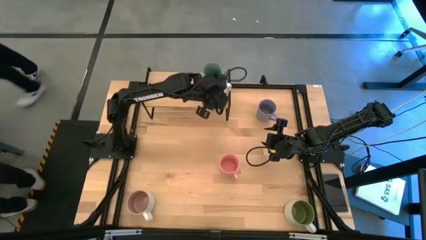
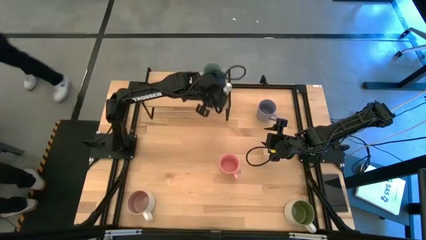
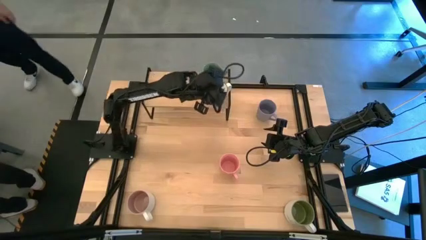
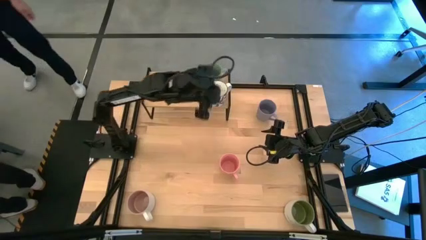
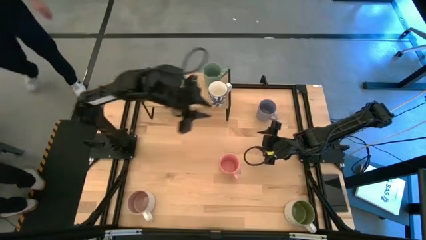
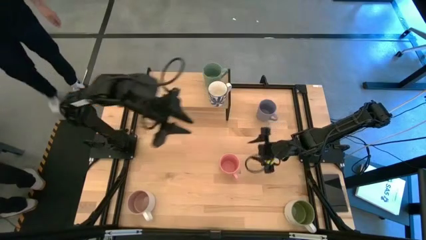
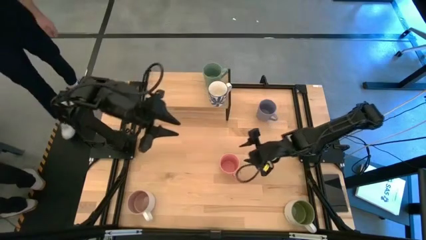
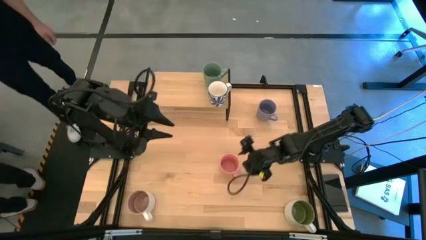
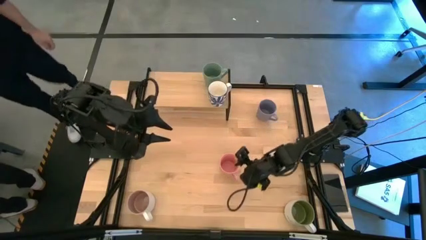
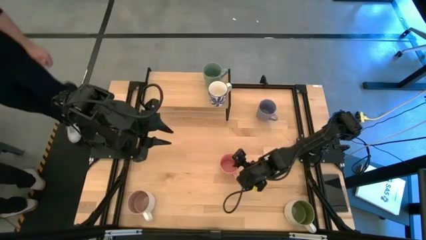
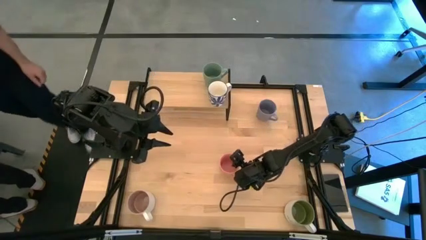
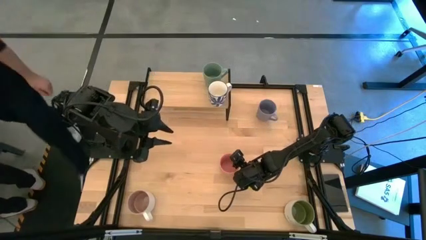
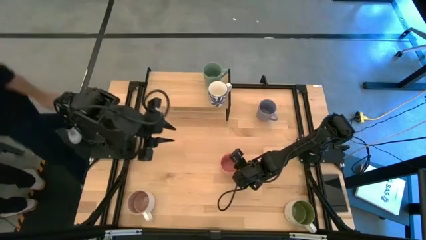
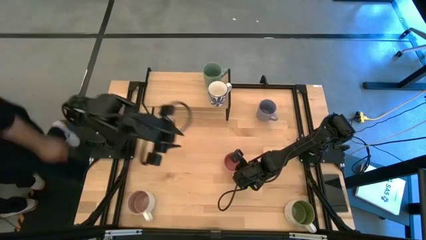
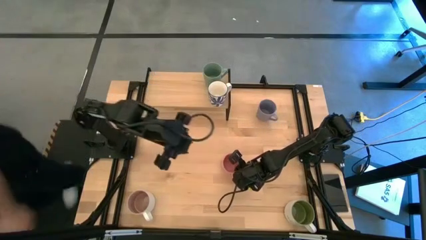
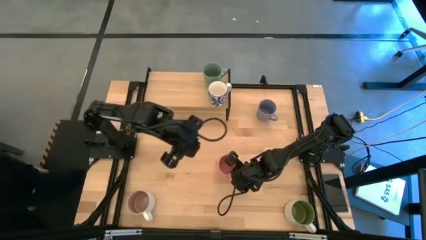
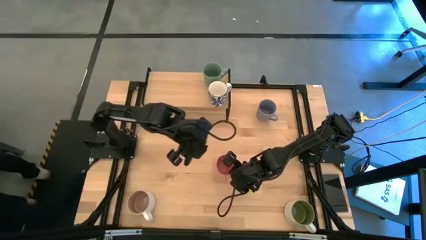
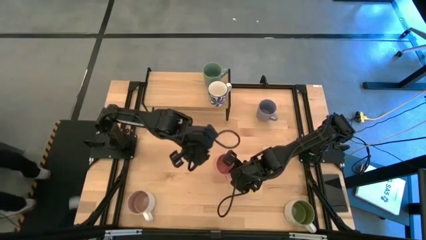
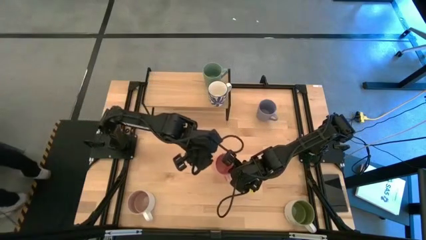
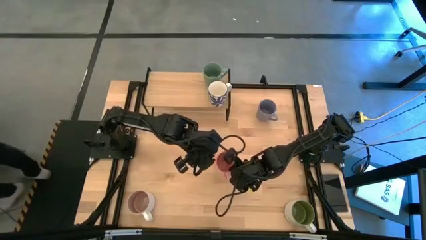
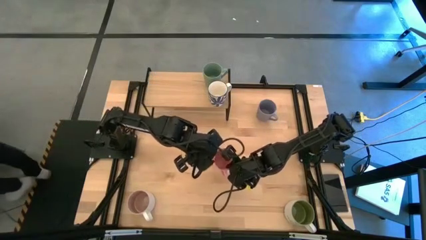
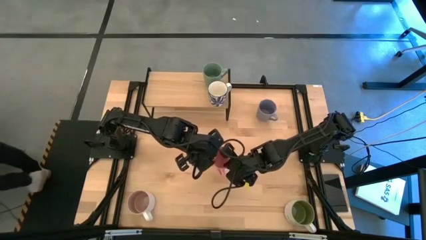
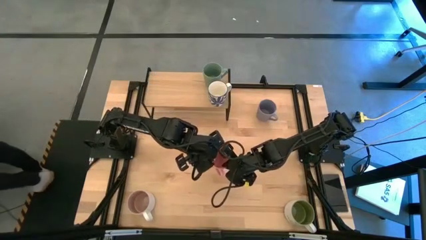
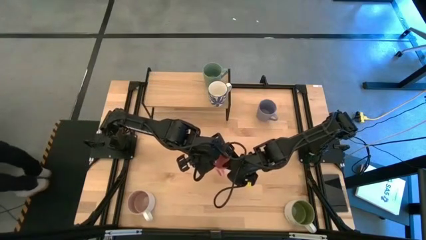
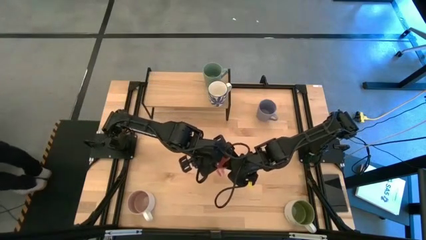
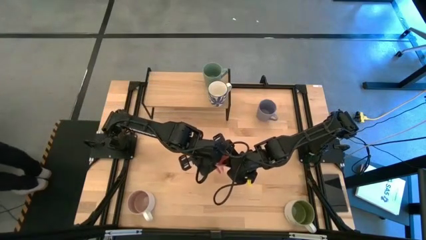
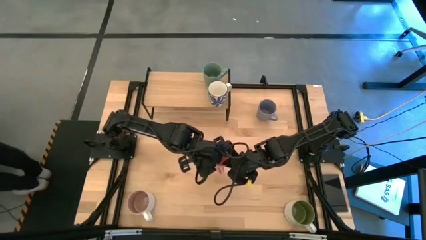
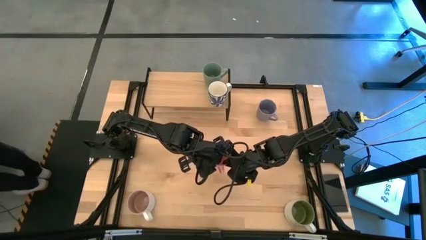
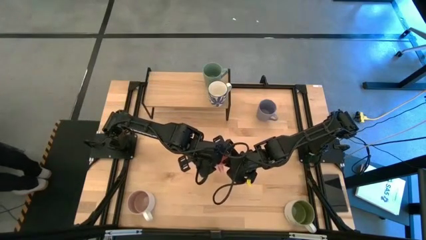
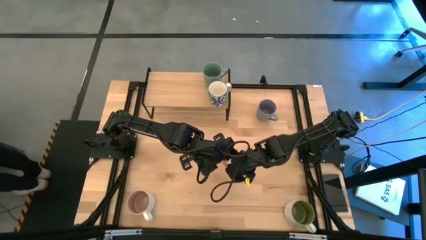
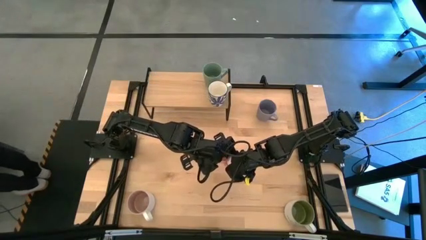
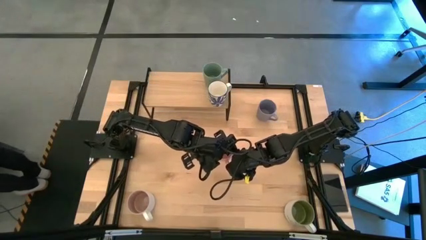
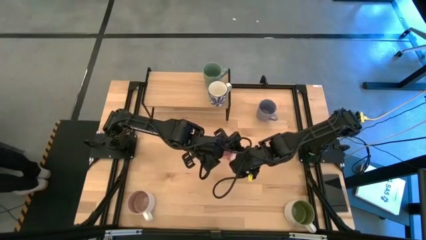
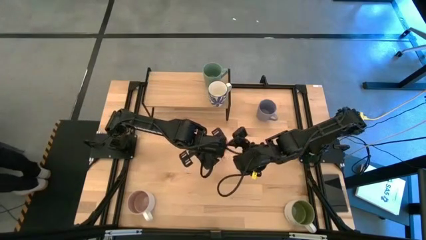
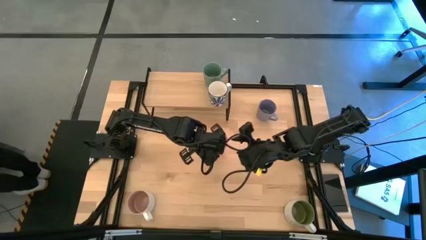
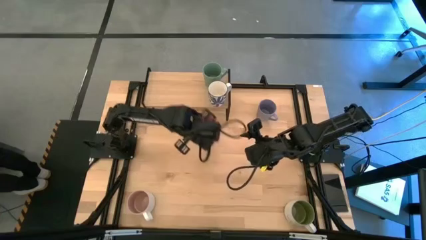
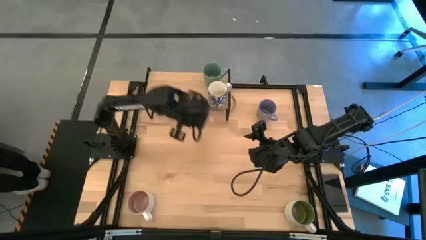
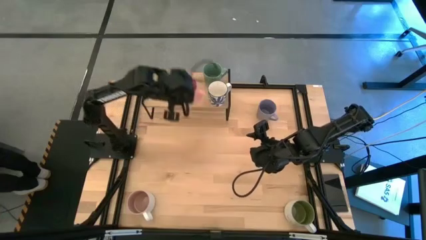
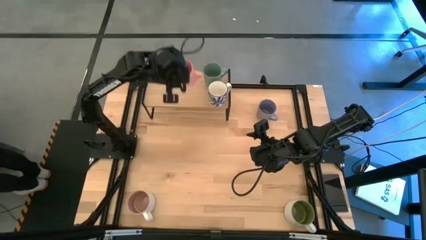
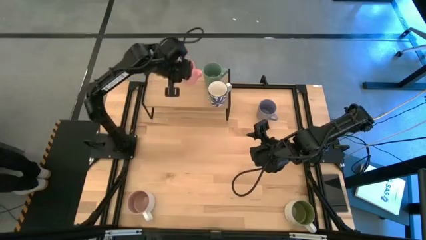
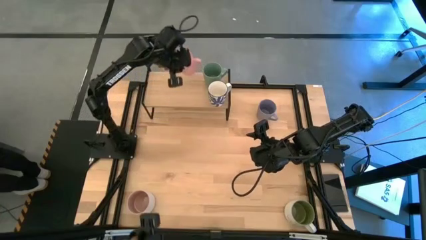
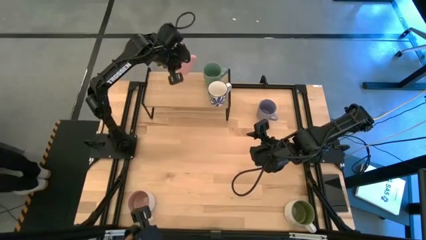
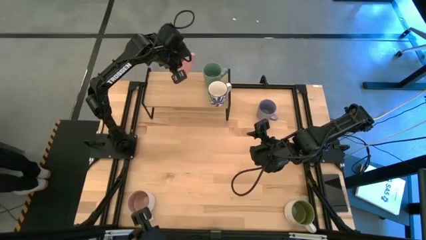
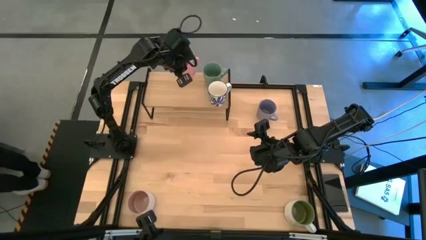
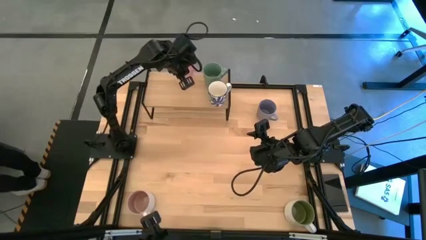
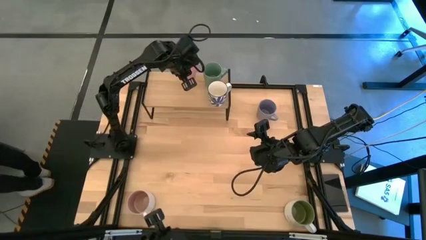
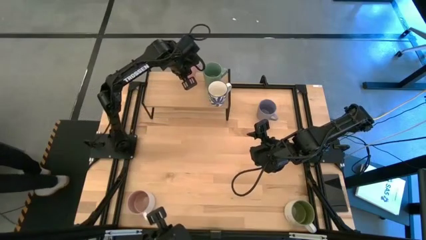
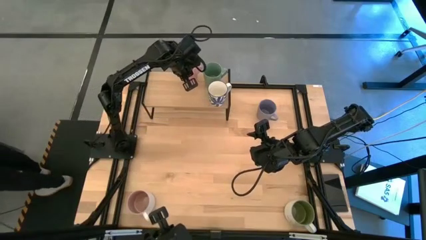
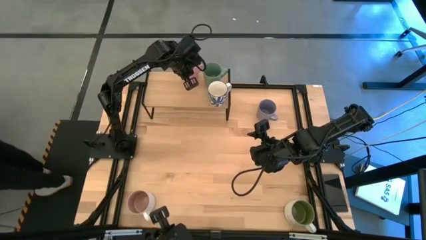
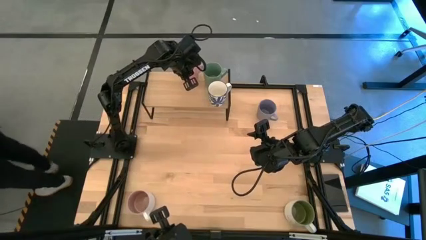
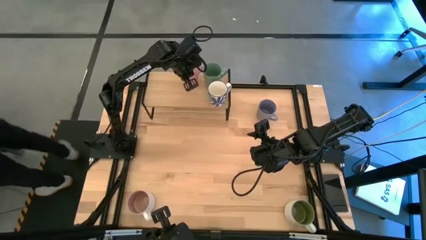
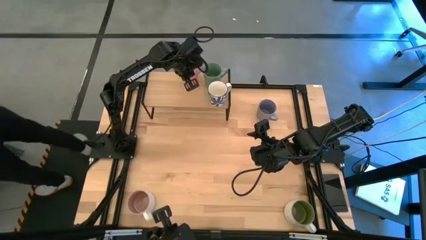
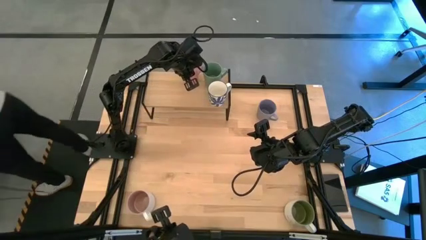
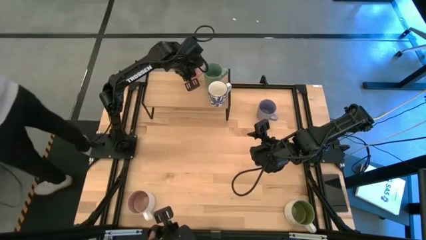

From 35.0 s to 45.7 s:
Task: Place coffee mugs
Put the pink mug on the shelf

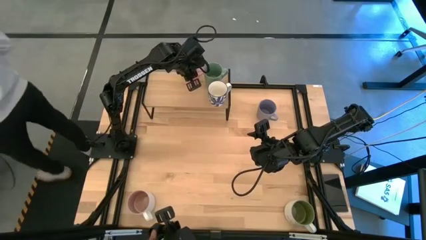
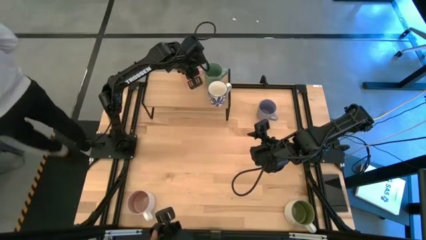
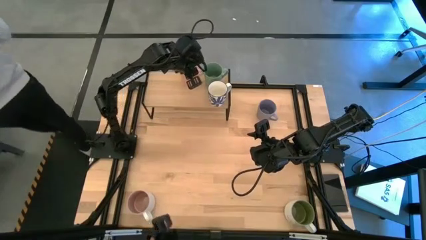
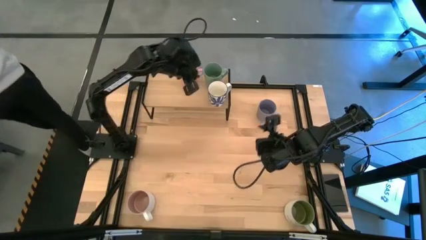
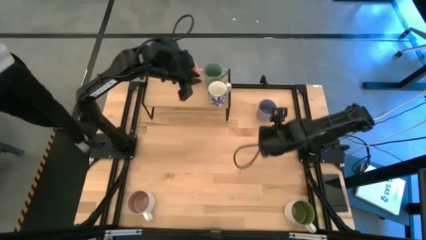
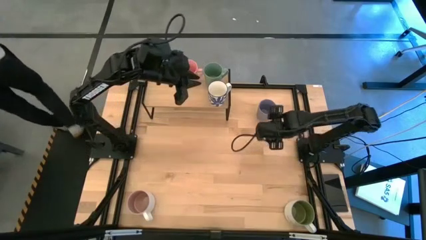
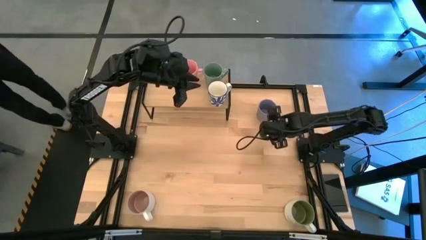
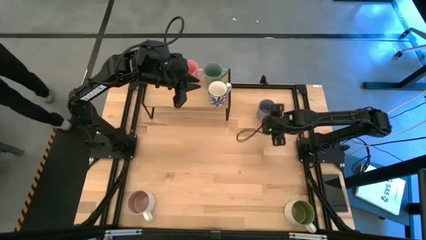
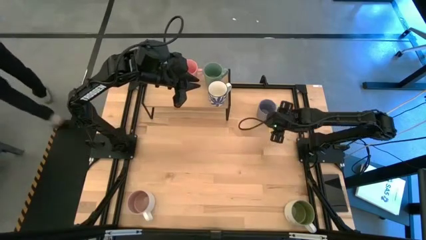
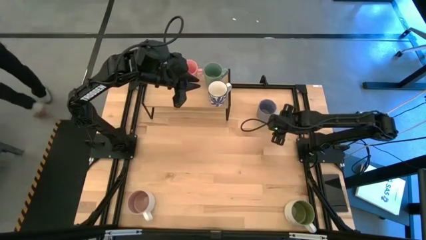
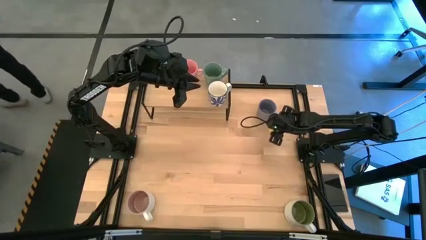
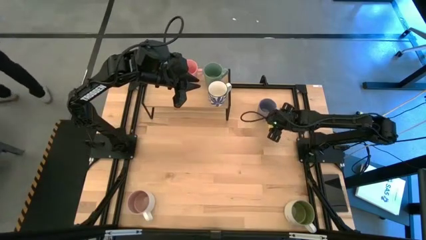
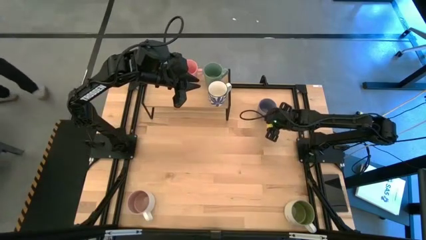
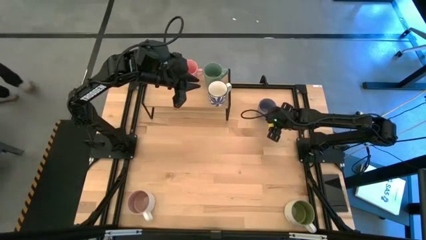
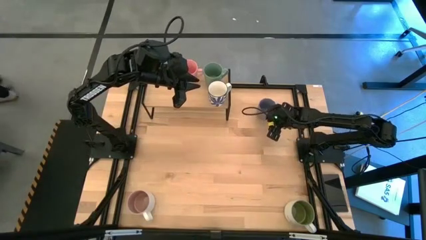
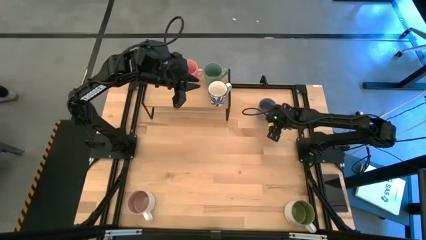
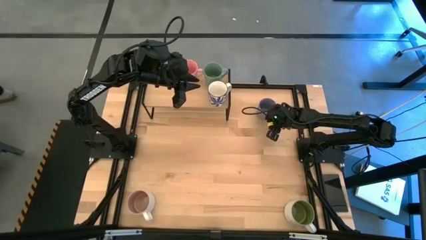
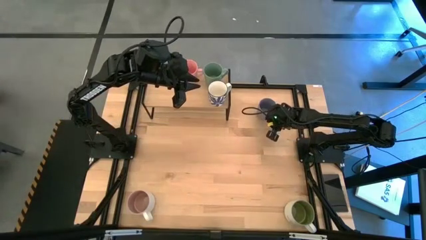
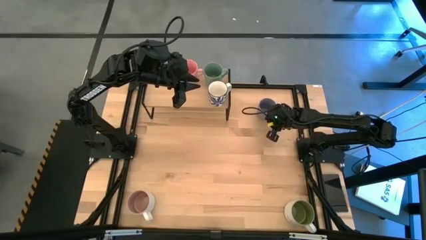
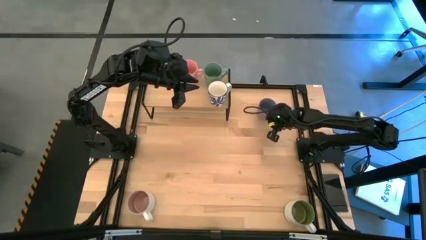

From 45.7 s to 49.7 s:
Put the blue mug on the shelf

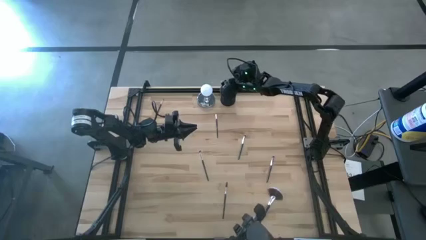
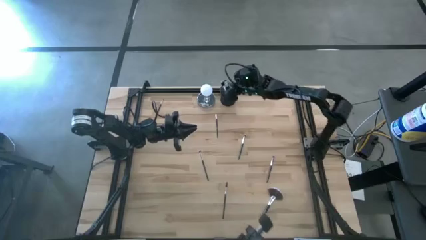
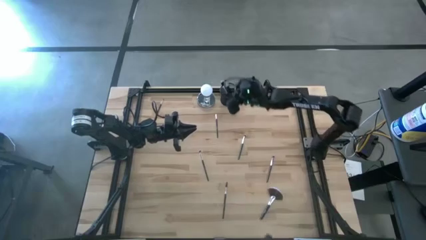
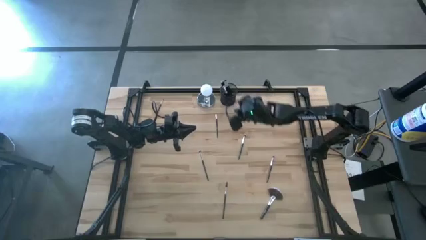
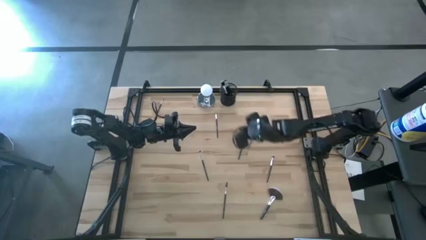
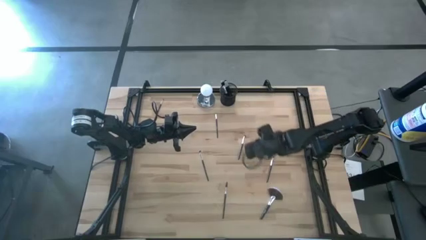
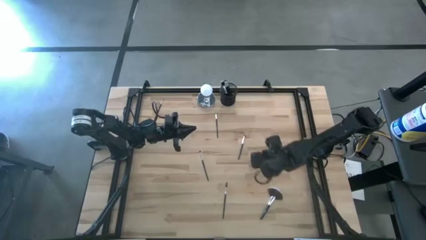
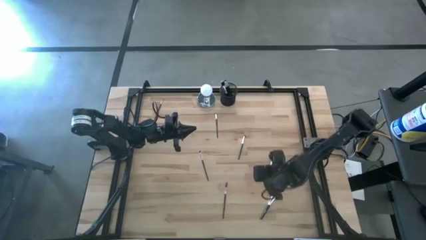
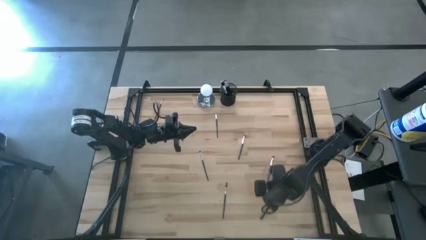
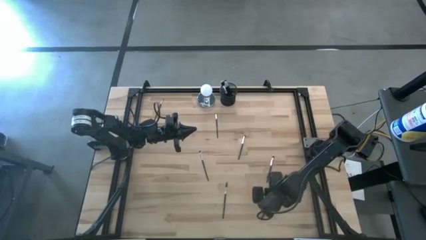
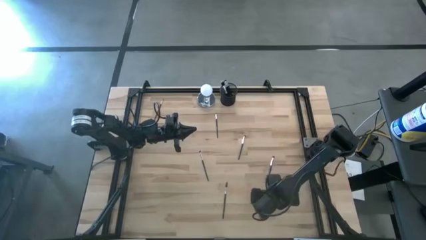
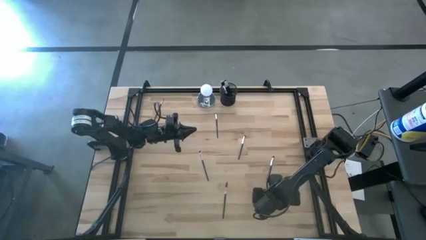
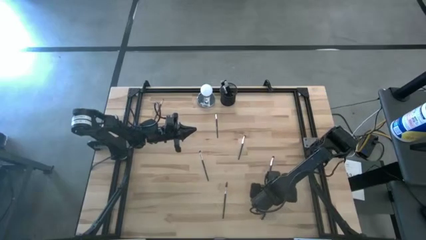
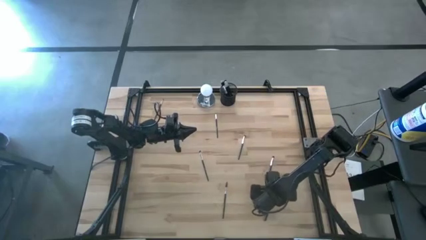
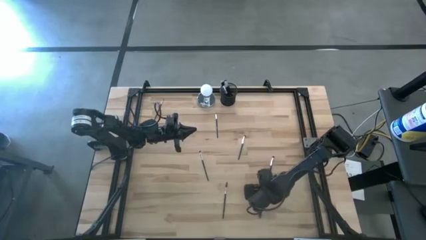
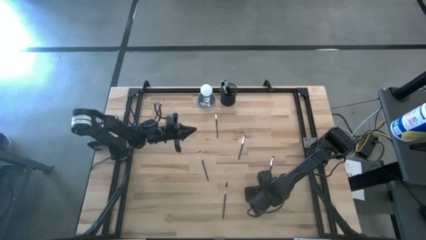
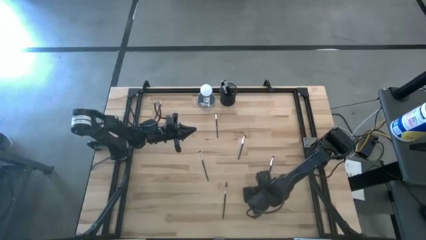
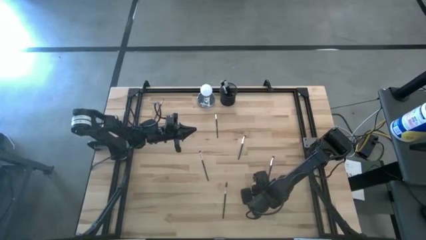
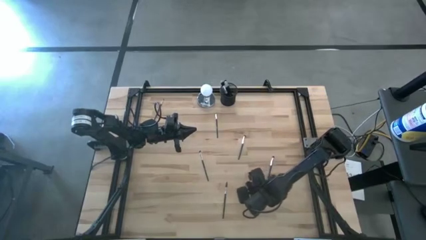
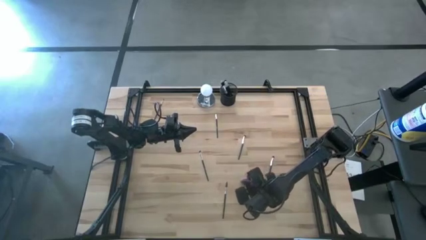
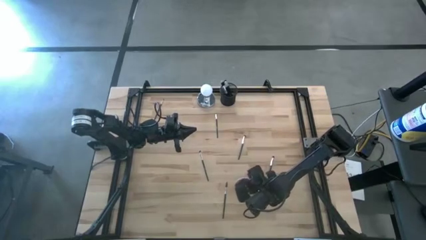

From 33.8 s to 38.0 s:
Task: Pick & Place Makeup Supplies
Put the makeup brush into the black makeup holder
